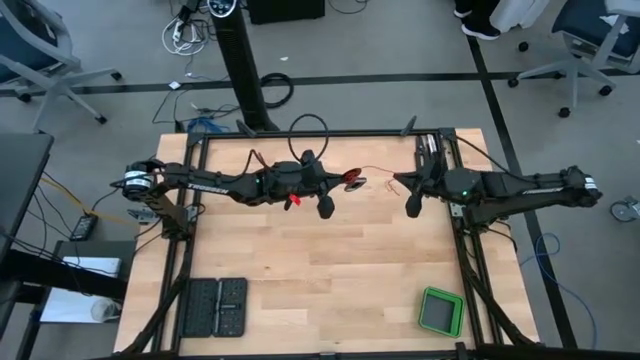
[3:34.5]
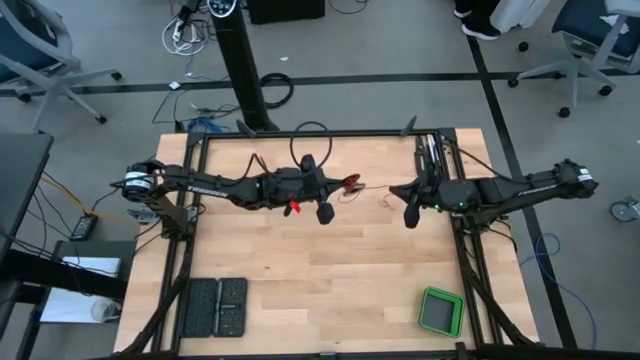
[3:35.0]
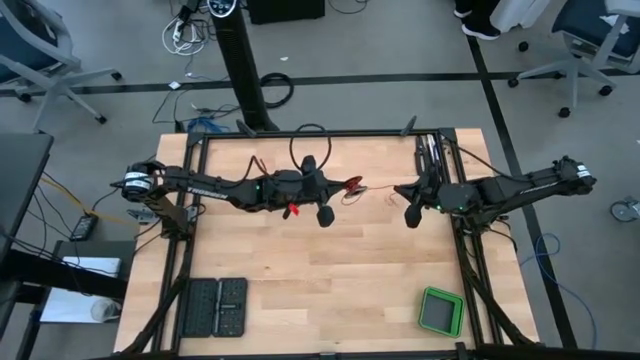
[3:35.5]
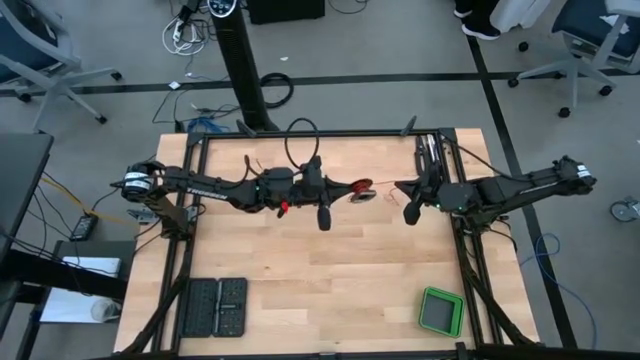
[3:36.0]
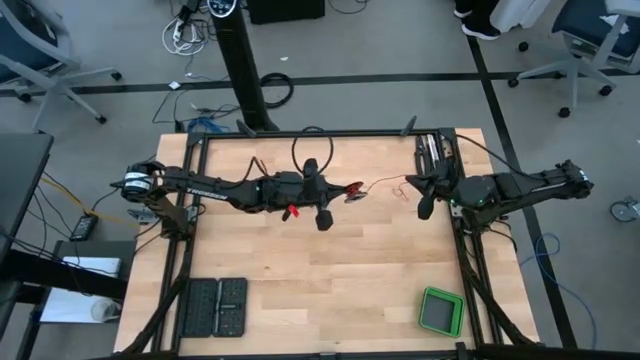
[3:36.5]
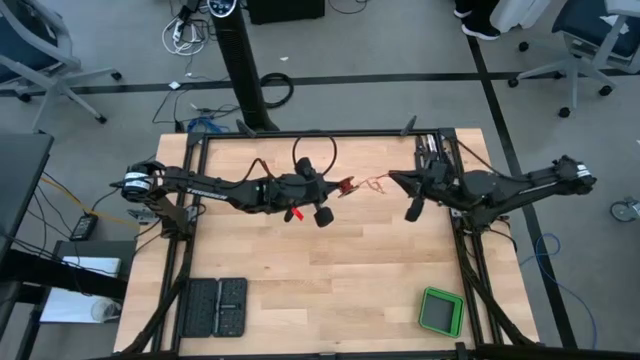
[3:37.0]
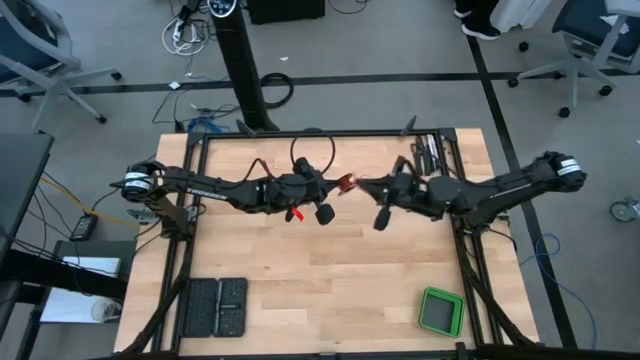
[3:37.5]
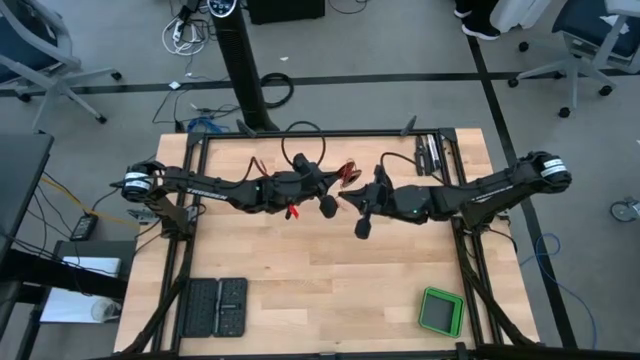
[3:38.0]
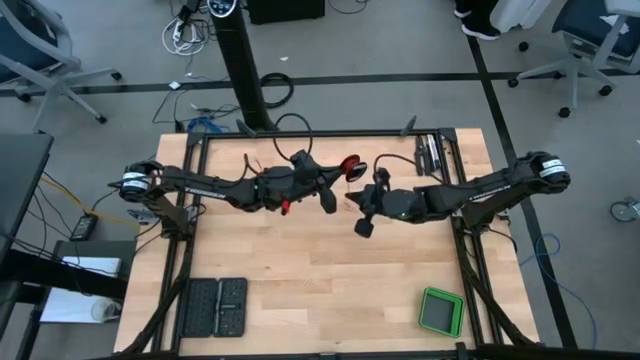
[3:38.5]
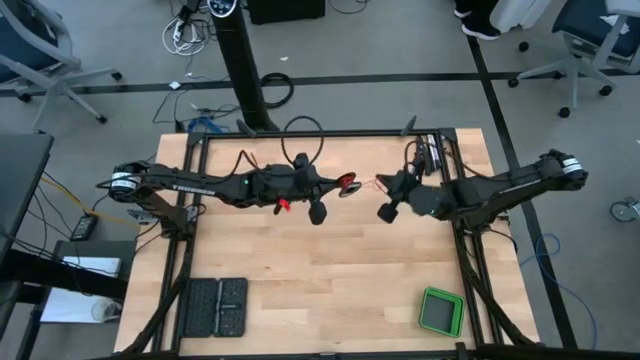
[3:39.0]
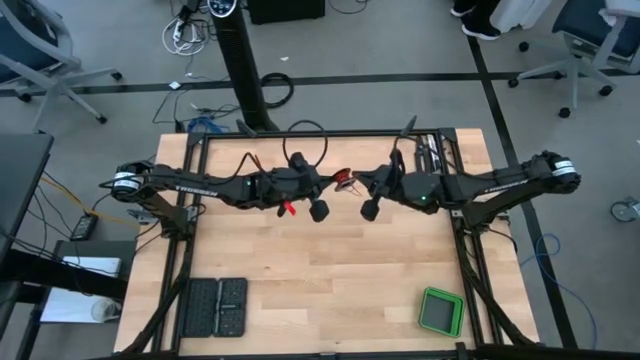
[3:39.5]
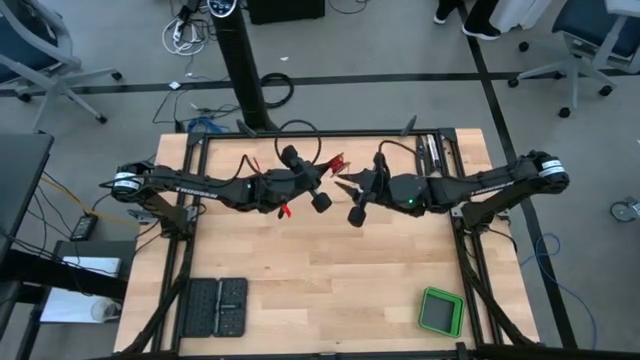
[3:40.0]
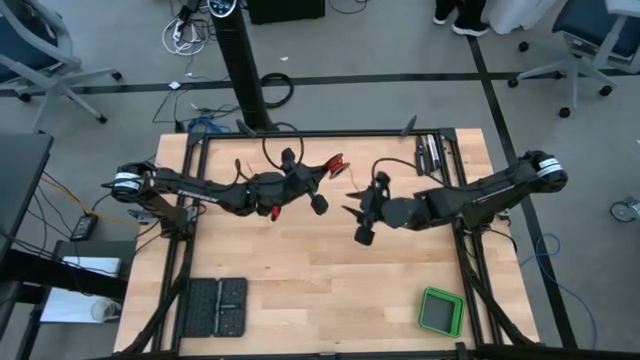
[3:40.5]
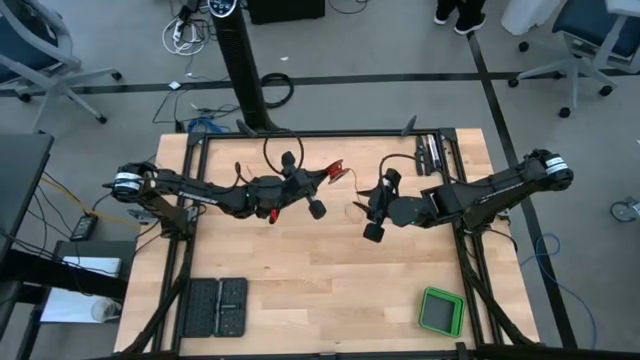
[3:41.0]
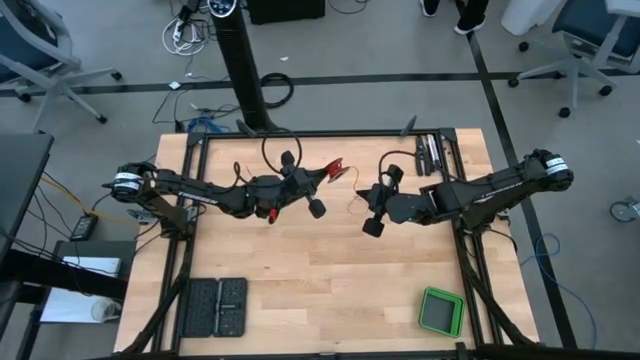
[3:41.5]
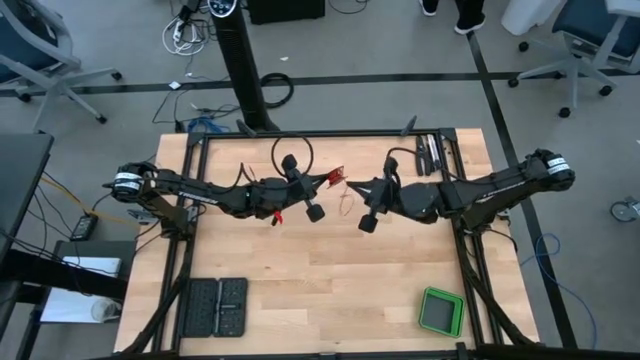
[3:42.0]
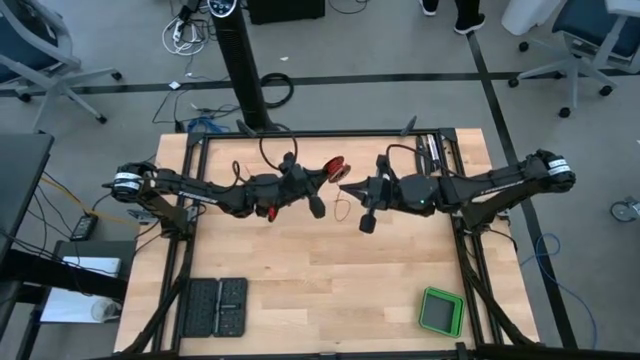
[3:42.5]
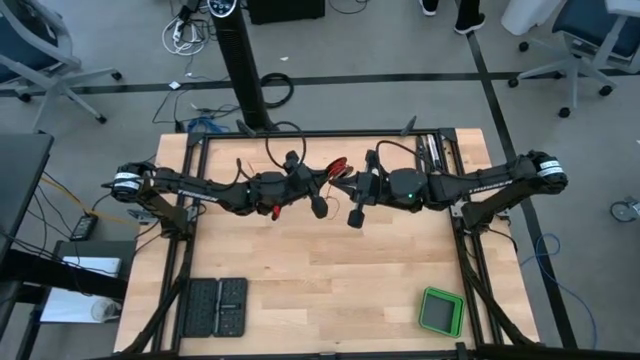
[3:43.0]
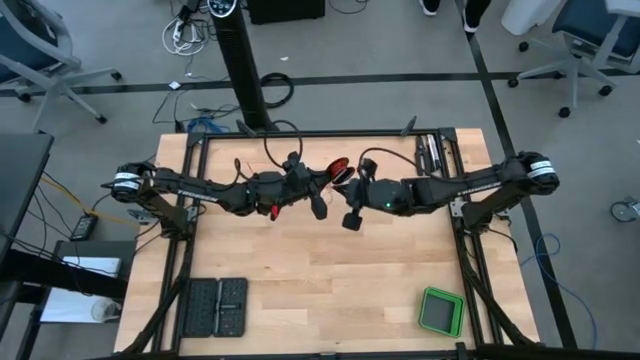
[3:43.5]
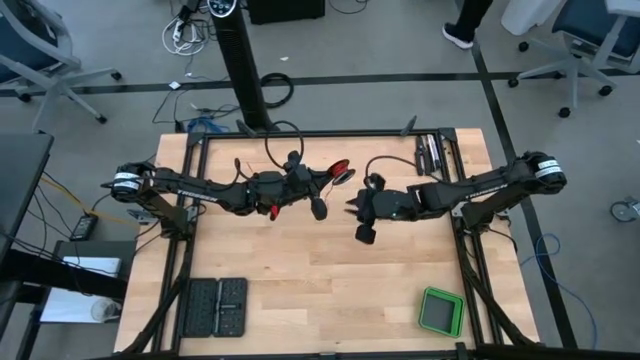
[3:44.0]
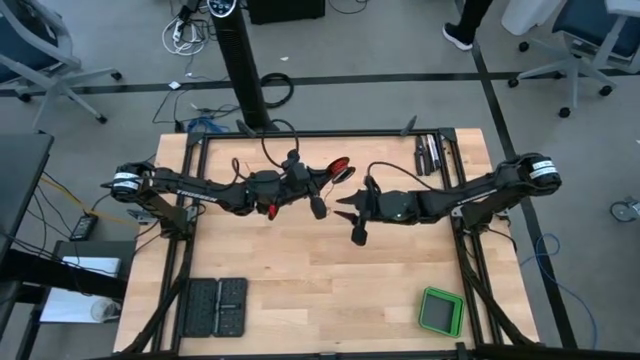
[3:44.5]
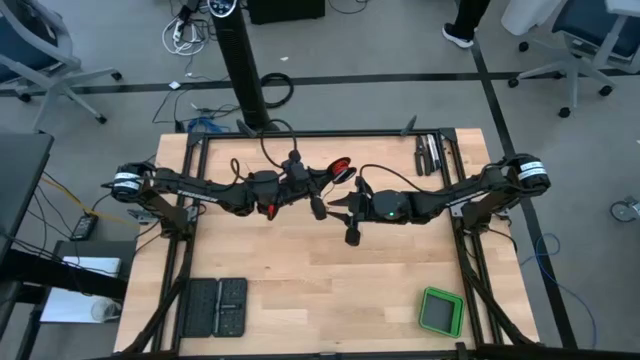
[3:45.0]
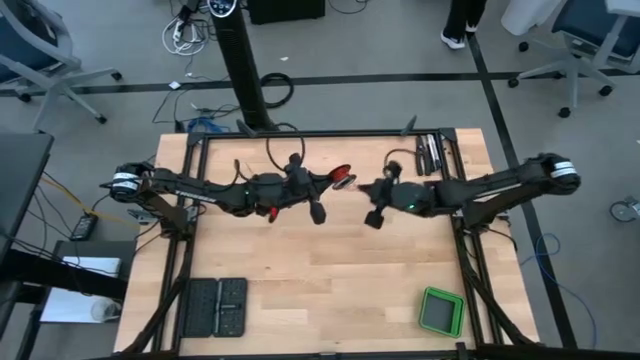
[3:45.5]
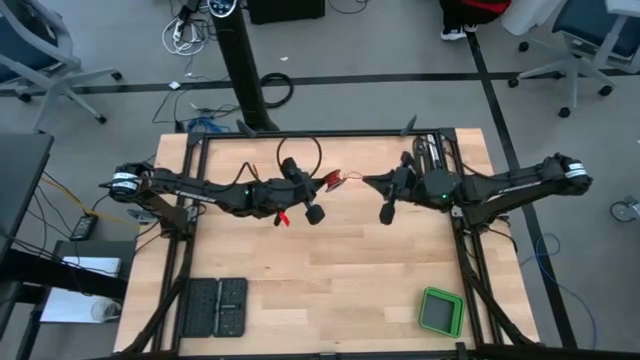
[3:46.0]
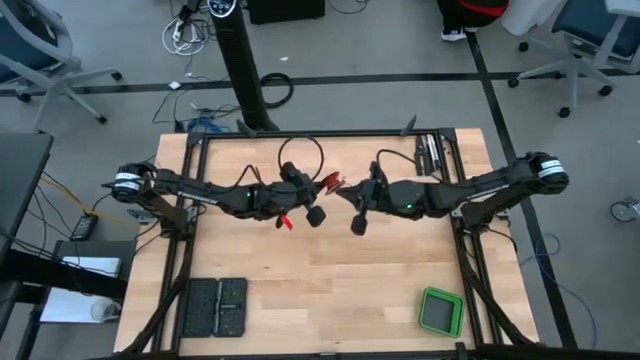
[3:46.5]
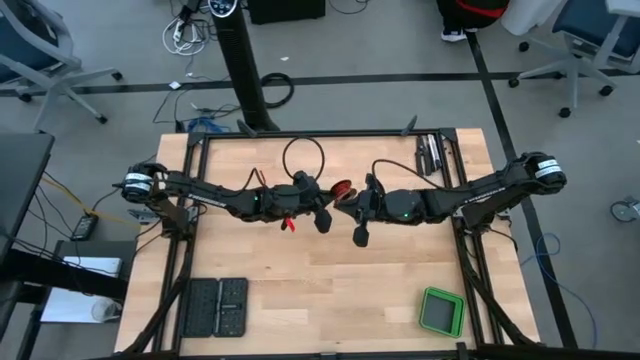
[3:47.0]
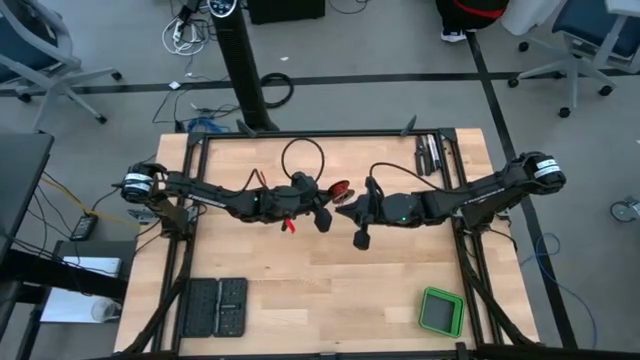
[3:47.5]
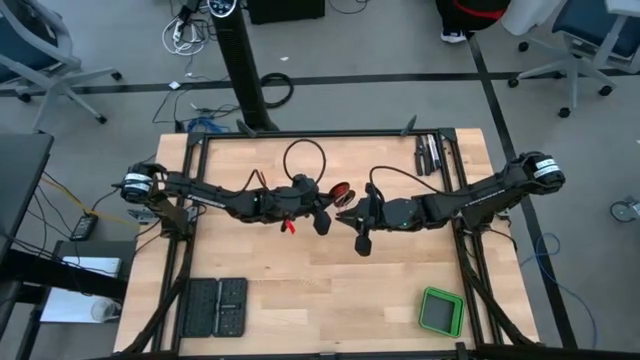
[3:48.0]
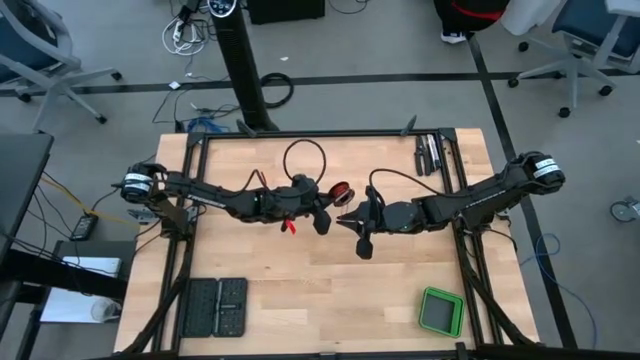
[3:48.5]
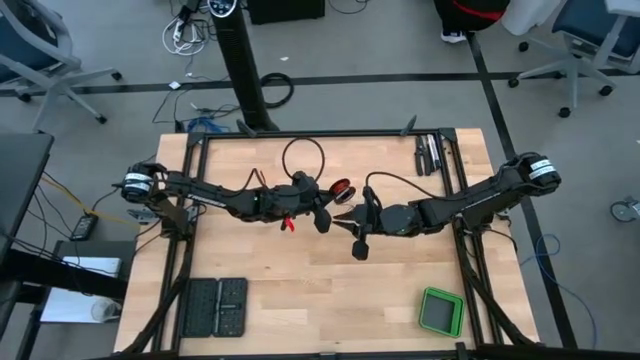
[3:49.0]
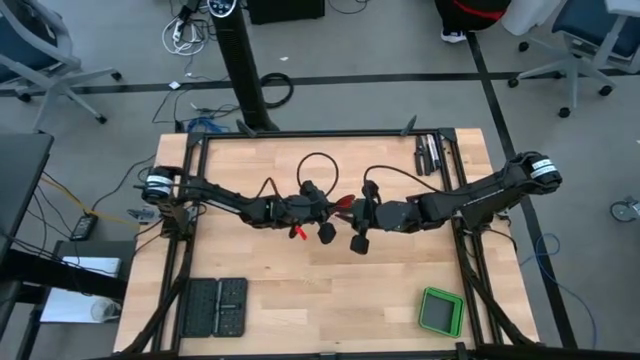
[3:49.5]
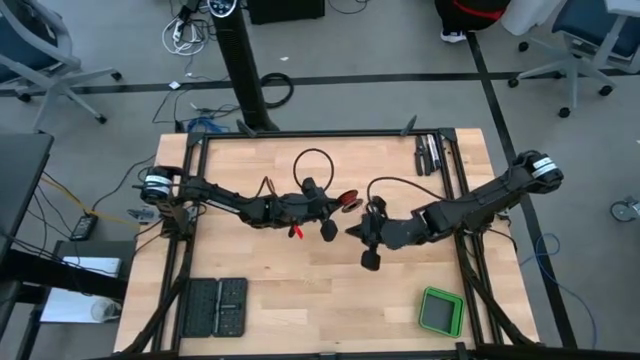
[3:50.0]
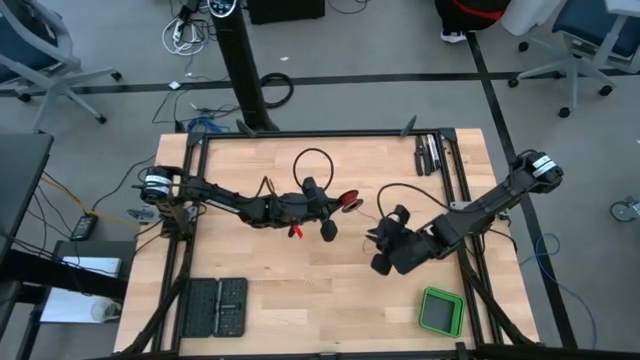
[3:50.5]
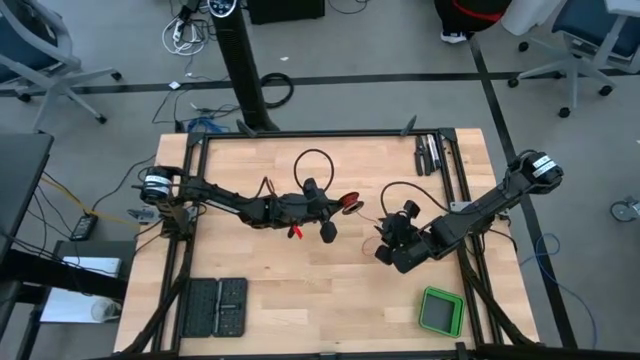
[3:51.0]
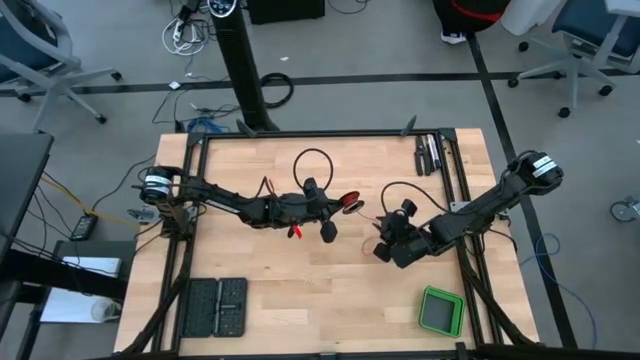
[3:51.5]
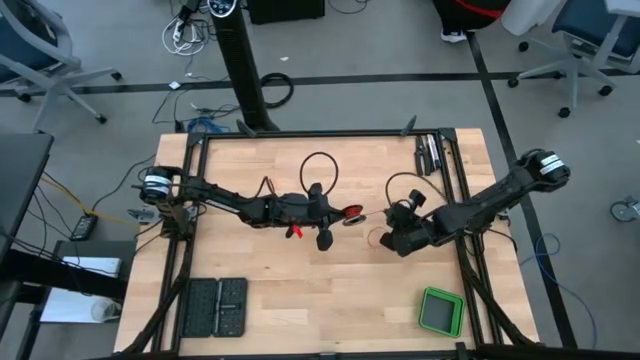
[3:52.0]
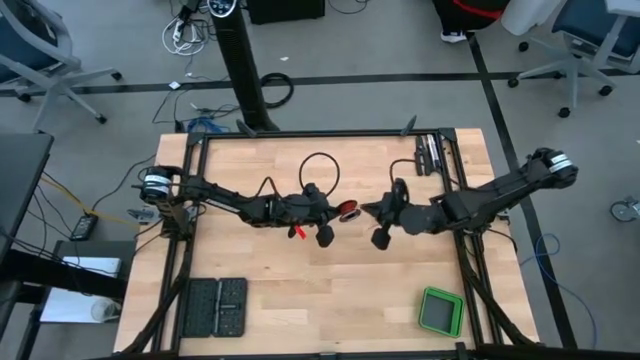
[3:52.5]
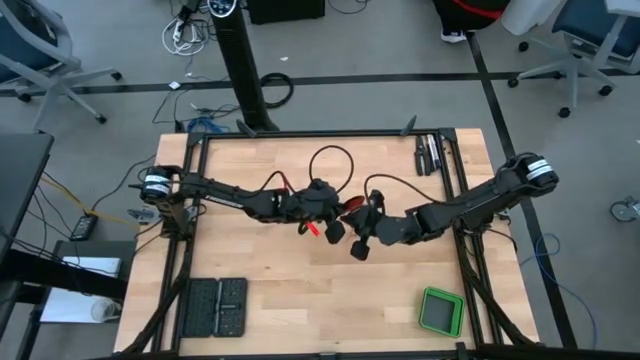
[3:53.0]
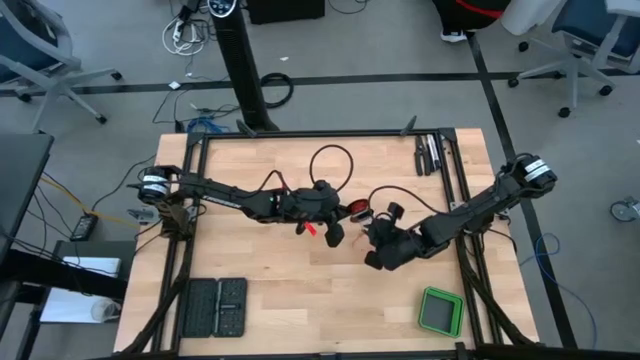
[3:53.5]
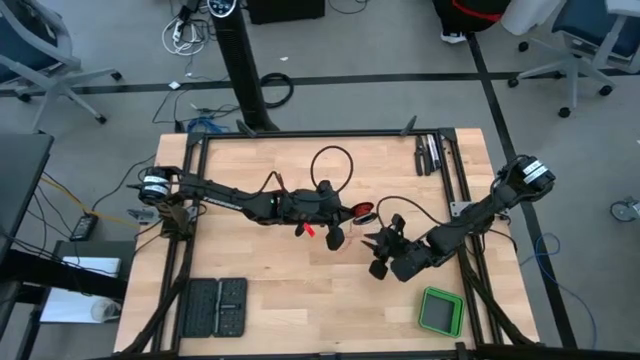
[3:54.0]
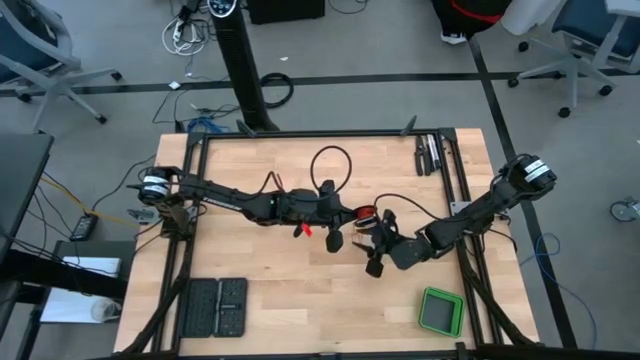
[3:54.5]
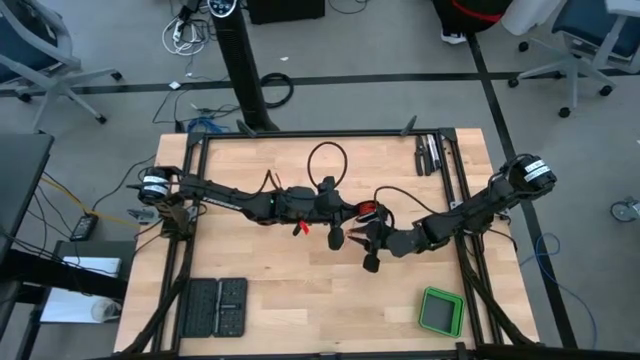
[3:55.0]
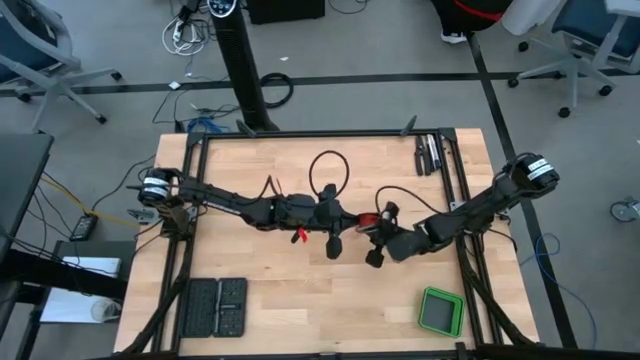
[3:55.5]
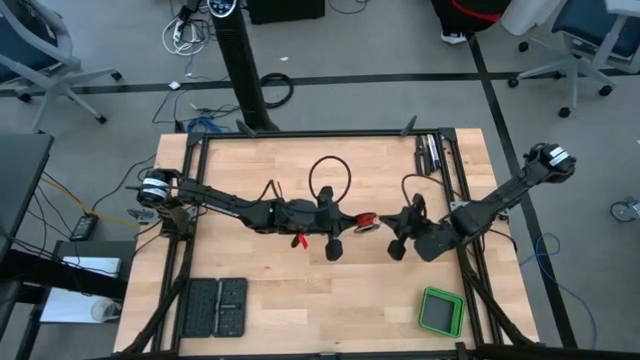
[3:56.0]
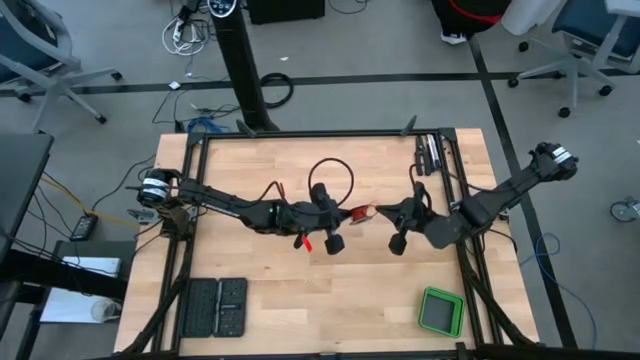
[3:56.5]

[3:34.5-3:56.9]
Task: Coil cords
Coil the red wire cable onto the black spool
